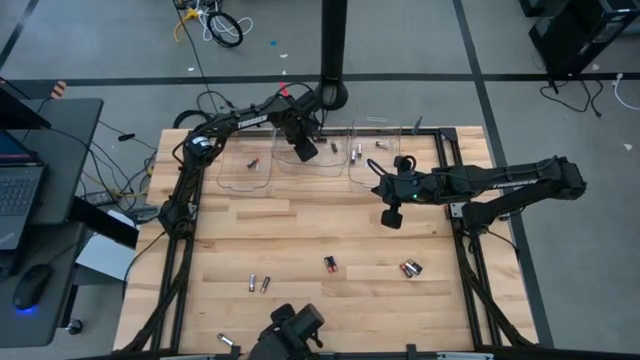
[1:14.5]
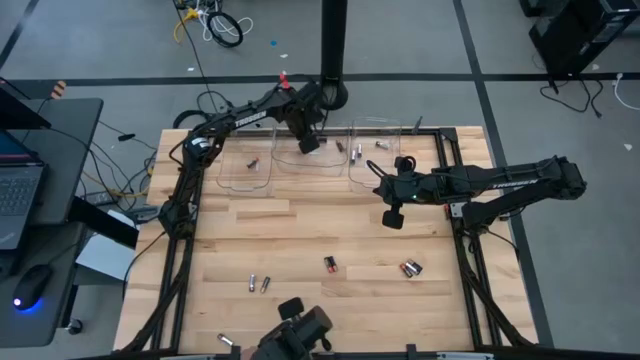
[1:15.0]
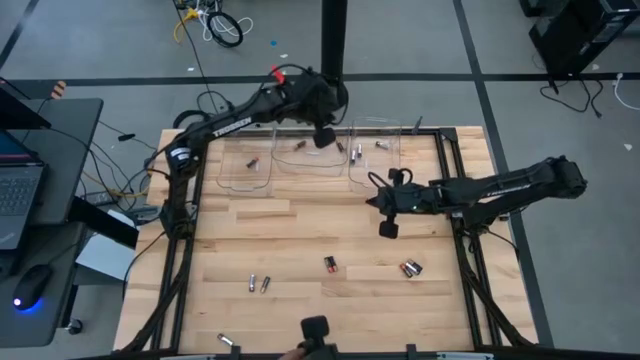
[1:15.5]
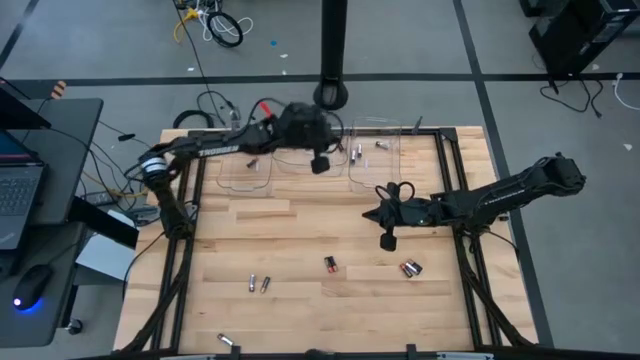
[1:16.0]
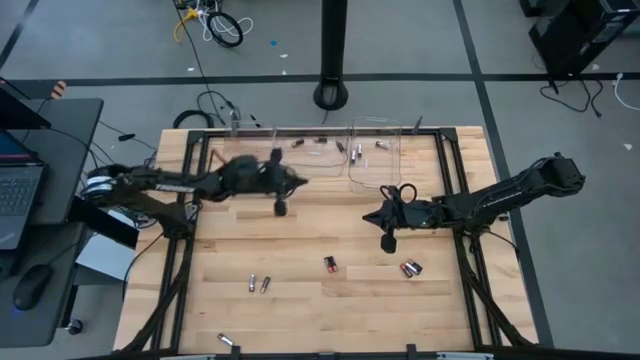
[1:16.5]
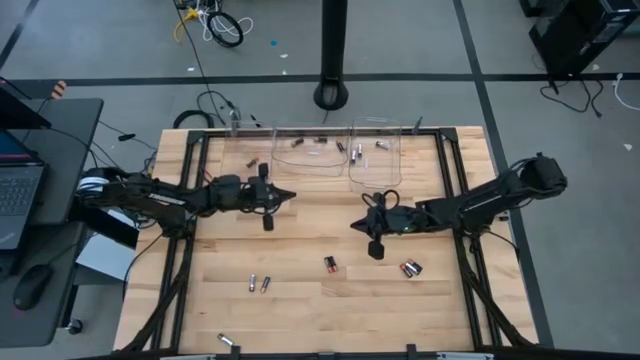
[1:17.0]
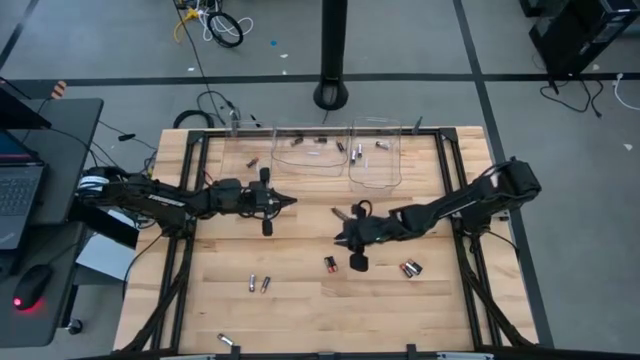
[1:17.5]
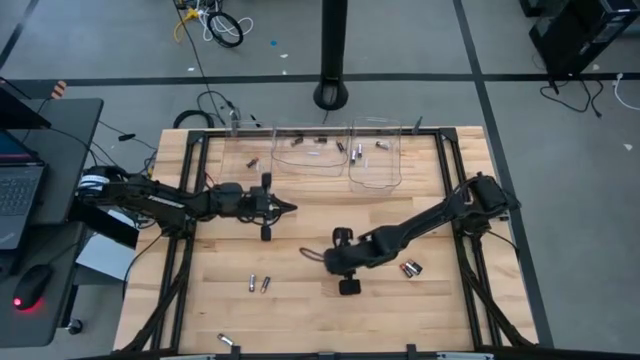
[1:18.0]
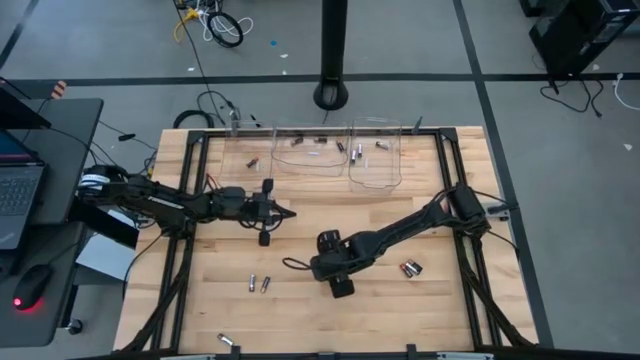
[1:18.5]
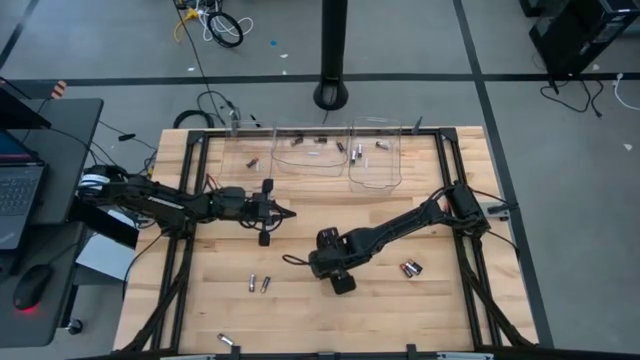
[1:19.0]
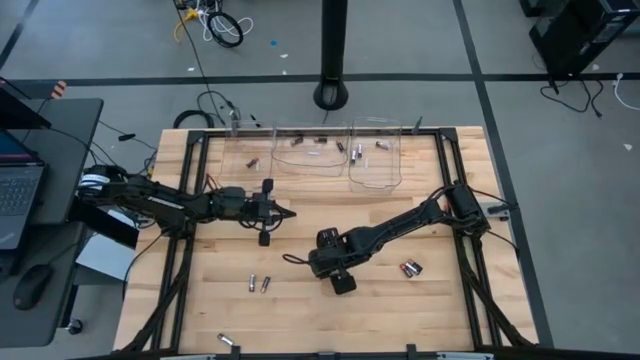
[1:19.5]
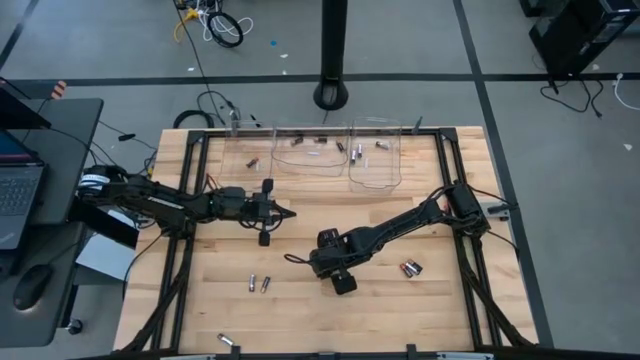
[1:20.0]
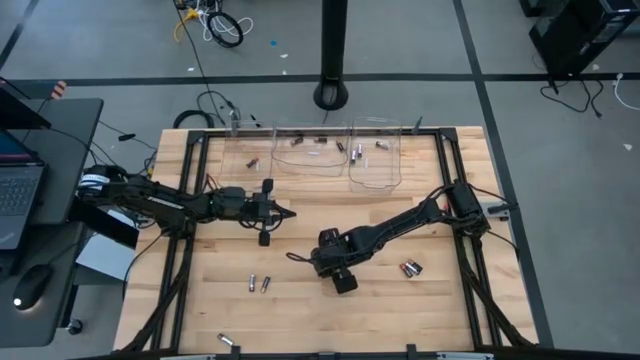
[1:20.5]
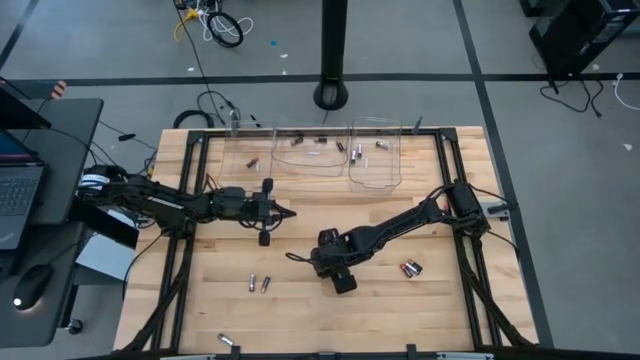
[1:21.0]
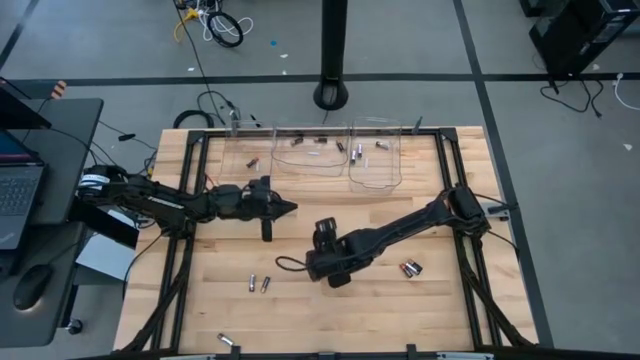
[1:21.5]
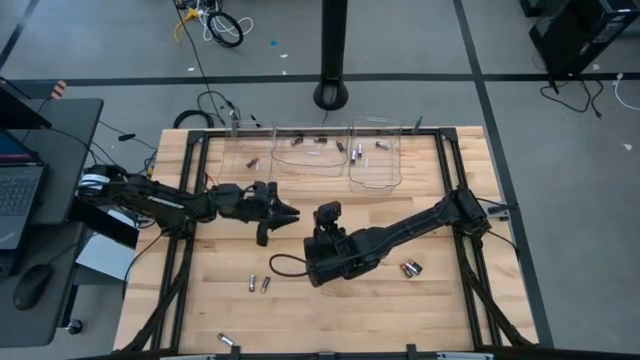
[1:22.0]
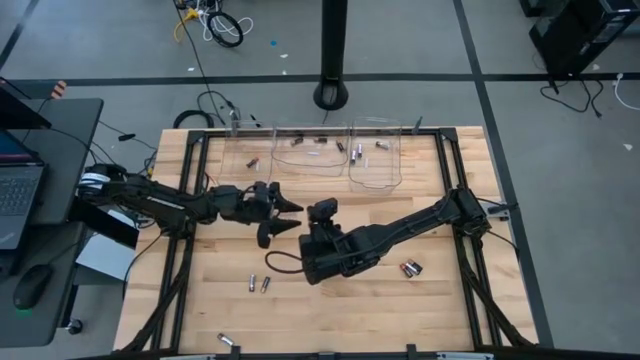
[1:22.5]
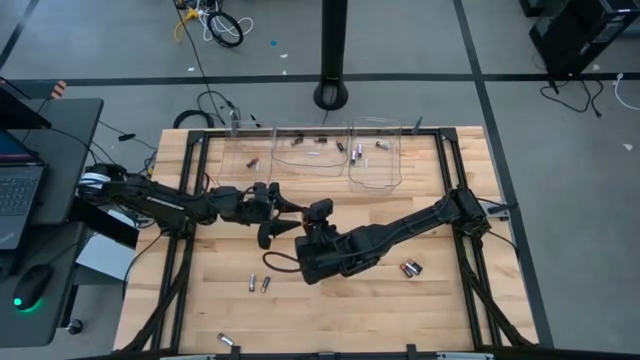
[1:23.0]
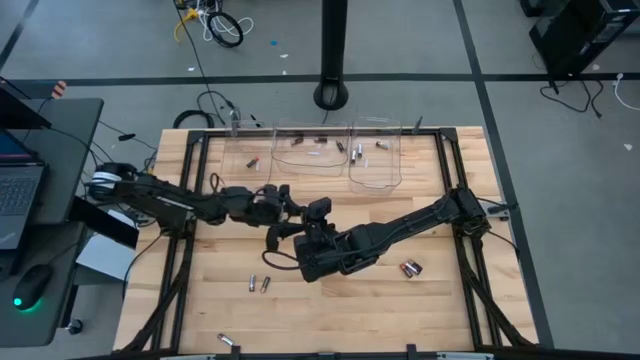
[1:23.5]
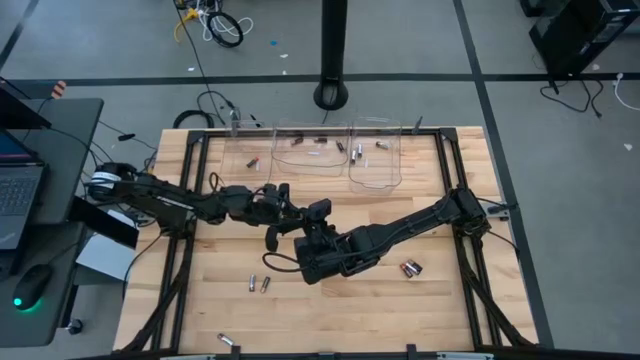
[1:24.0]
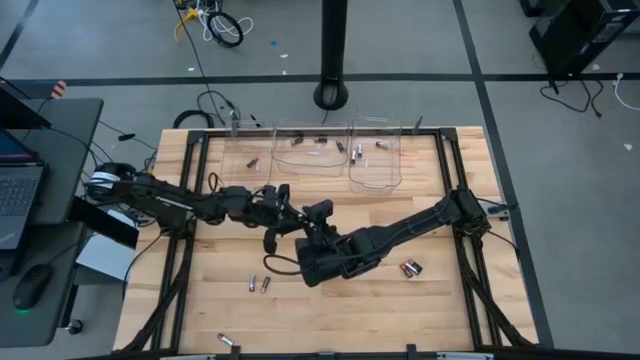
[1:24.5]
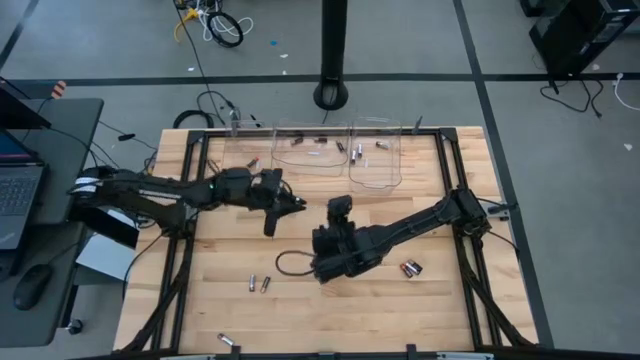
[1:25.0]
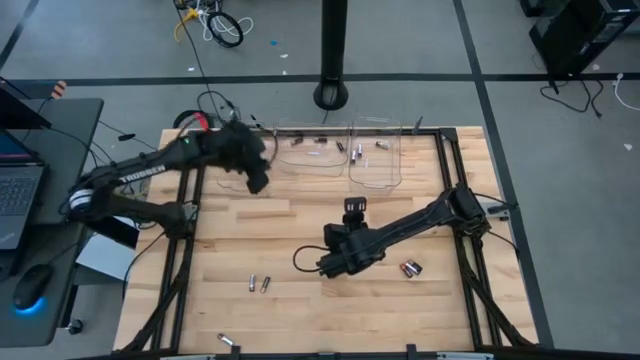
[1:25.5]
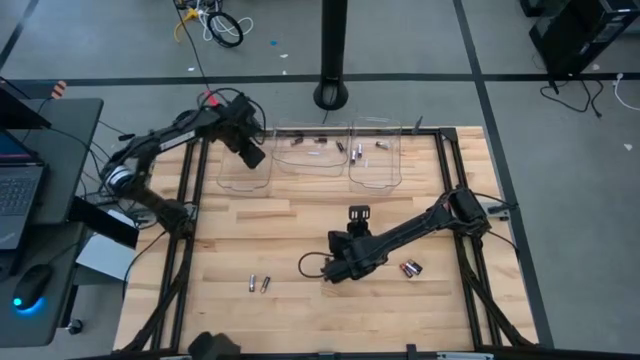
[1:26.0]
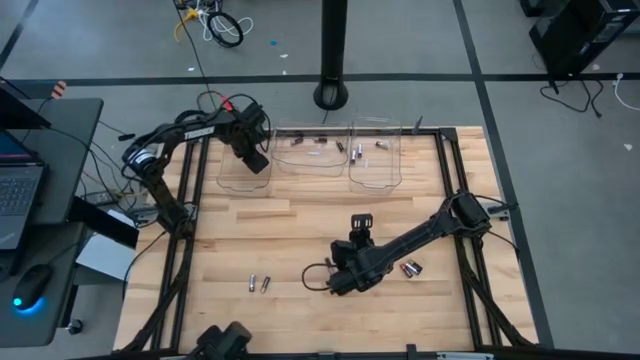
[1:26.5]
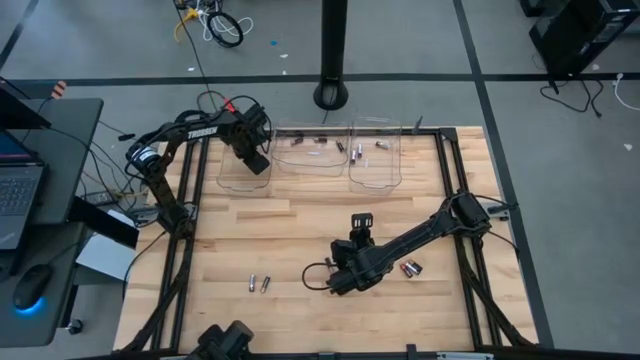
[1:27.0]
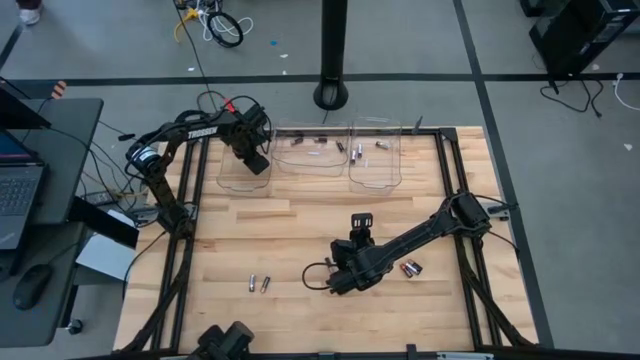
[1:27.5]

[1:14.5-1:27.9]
Task: Sort batteries
Put the orange battery into the left transparent bin

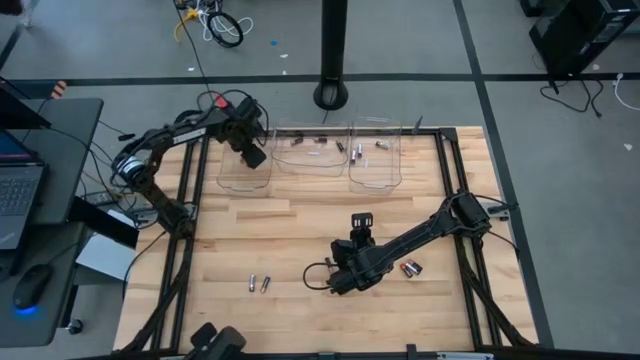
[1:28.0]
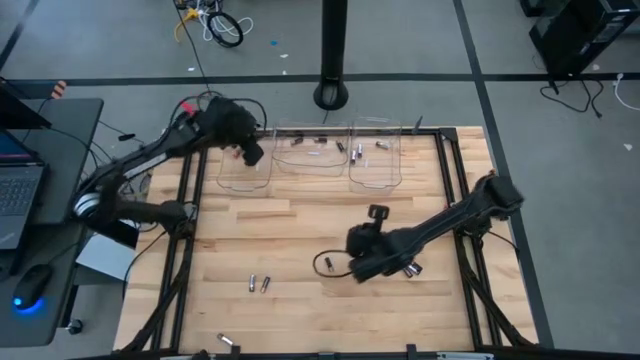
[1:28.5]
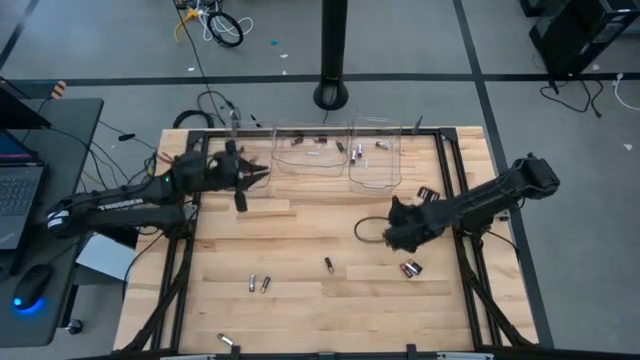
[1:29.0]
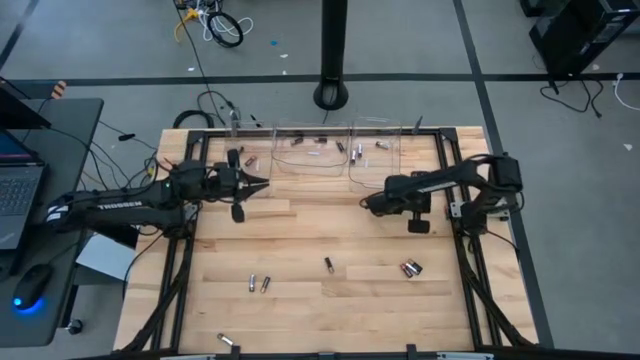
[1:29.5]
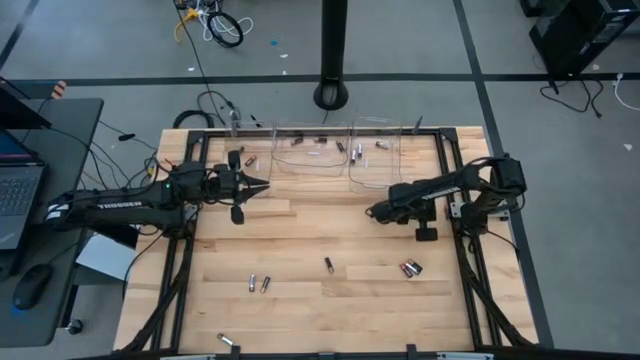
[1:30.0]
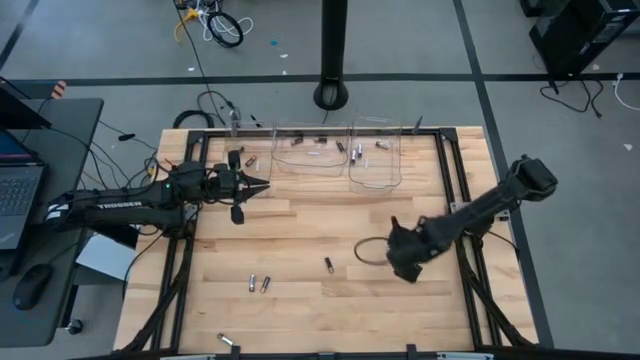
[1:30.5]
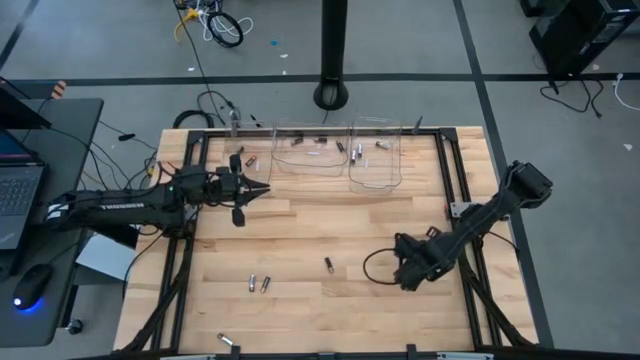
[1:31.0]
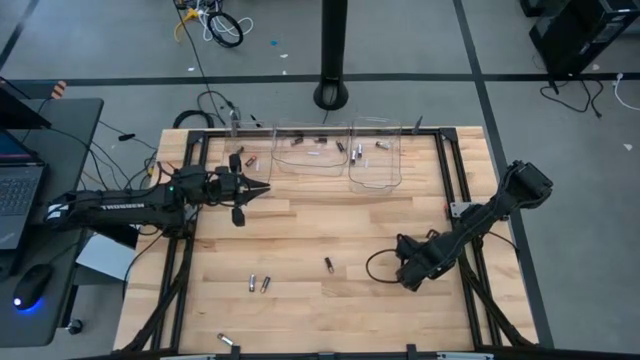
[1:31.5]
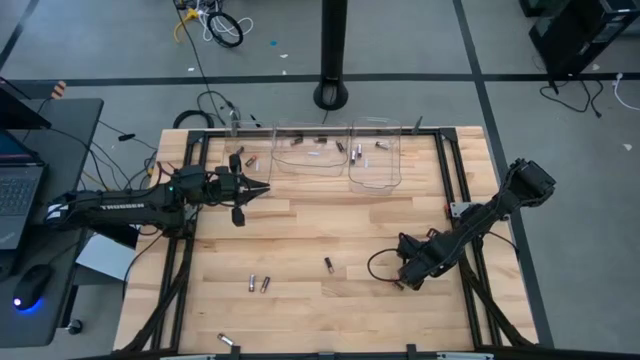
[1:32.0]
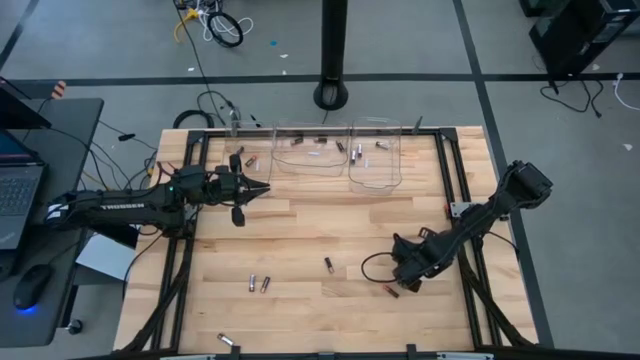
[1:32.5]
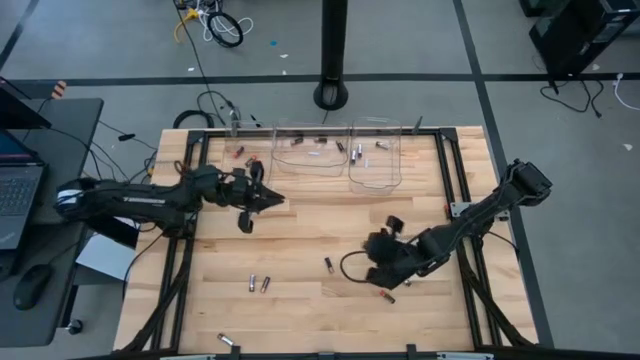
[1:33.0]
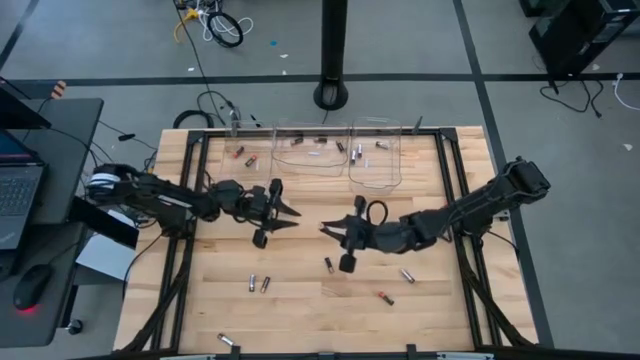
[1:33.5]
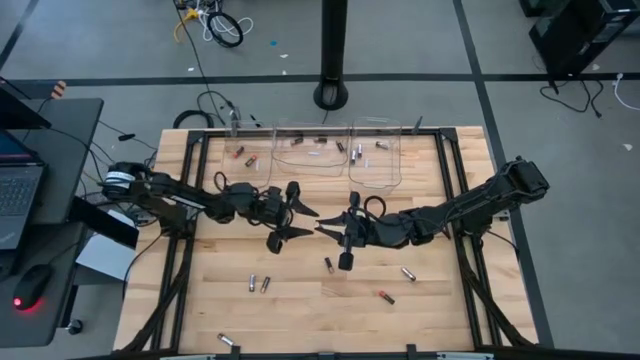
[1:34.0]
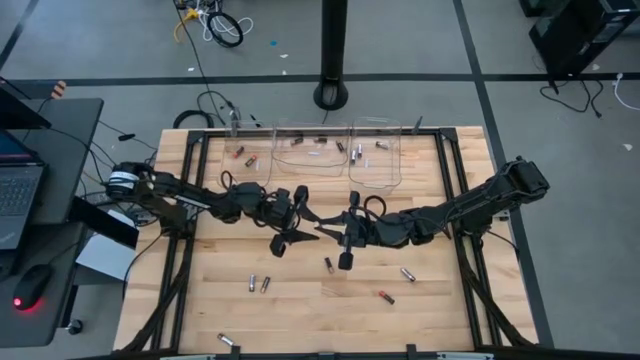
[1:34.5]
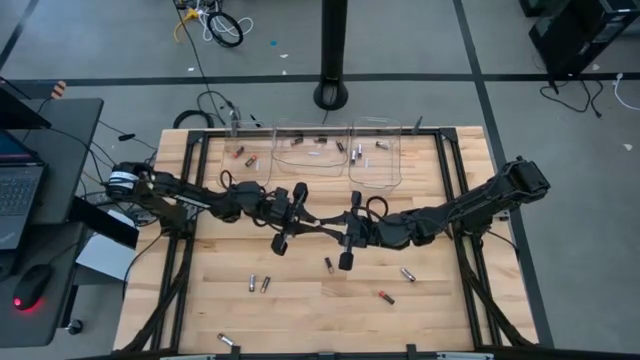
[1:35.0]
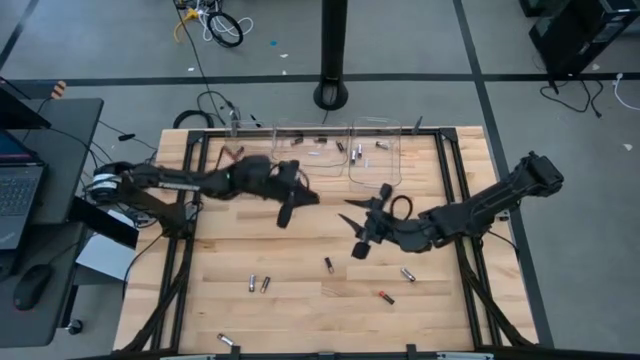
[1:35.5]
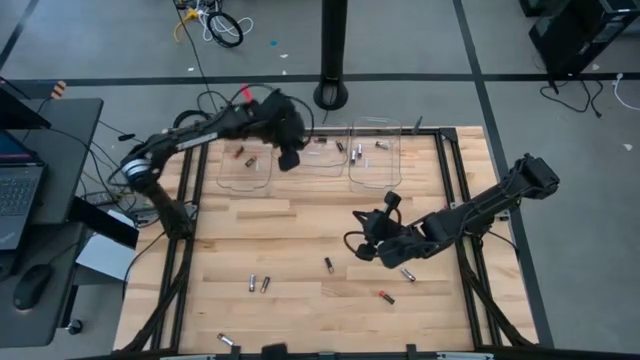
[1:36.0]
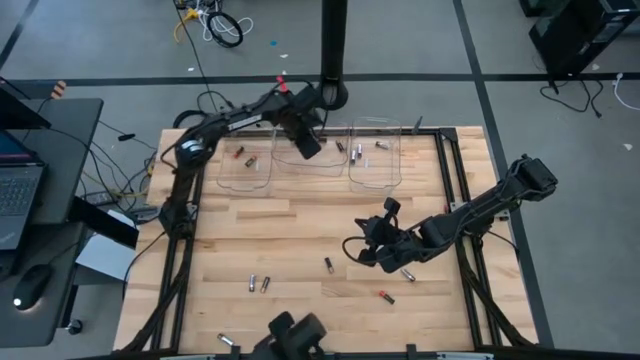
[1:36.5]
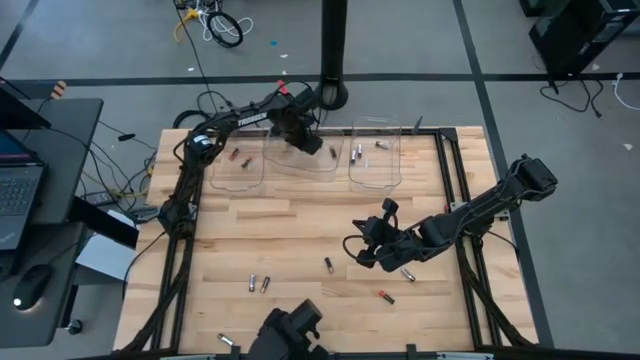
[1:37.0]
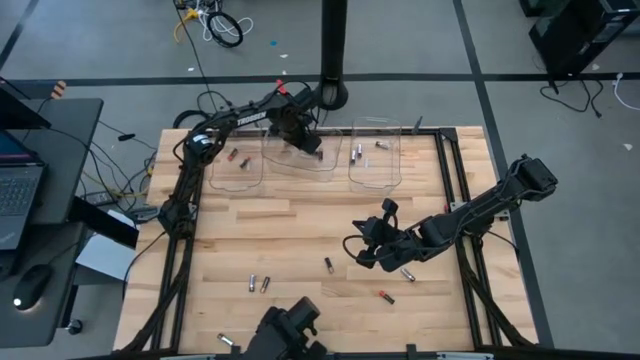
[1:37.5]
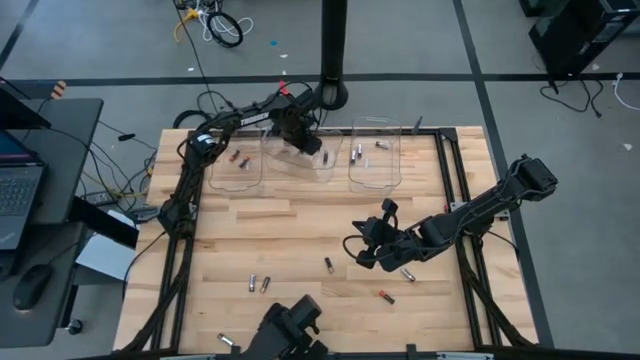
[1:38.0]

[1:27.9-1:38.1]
Put the black battery into the middle transparent bin
